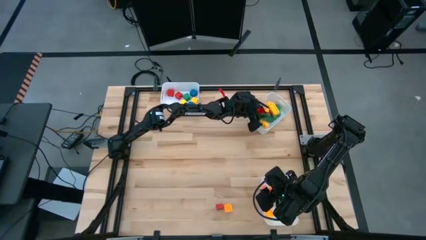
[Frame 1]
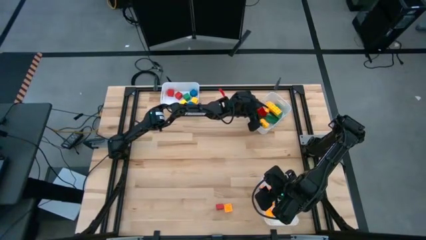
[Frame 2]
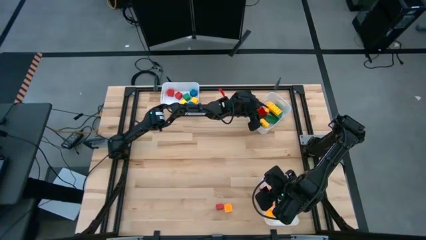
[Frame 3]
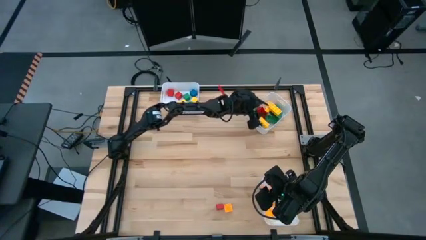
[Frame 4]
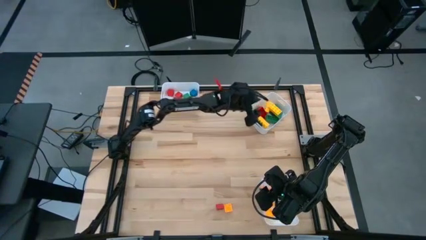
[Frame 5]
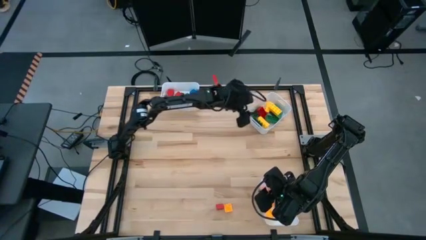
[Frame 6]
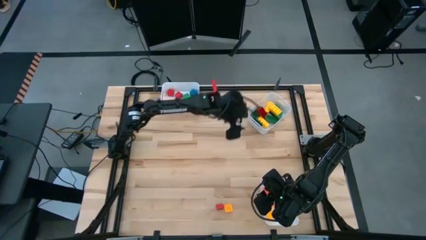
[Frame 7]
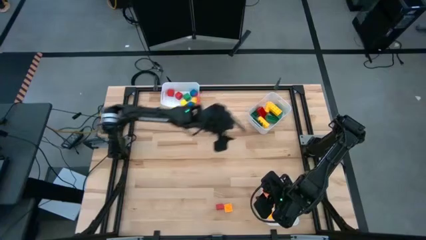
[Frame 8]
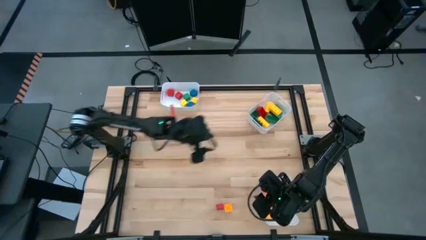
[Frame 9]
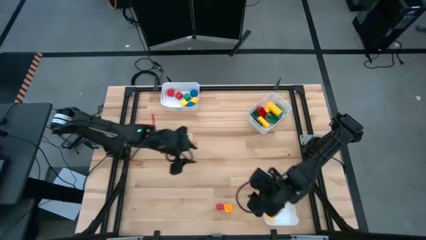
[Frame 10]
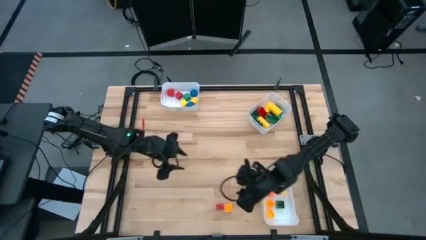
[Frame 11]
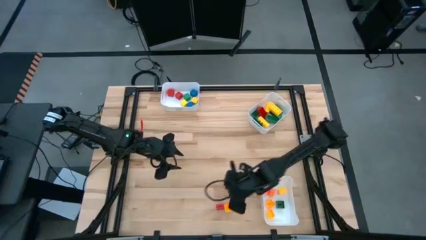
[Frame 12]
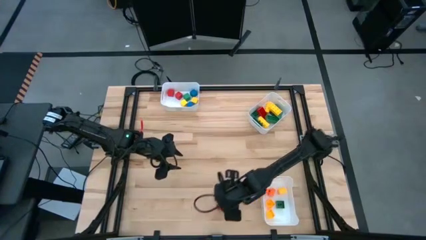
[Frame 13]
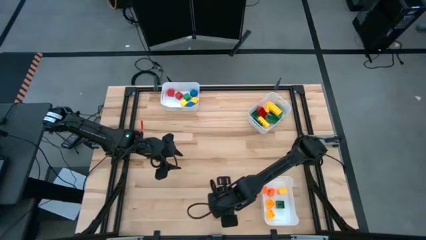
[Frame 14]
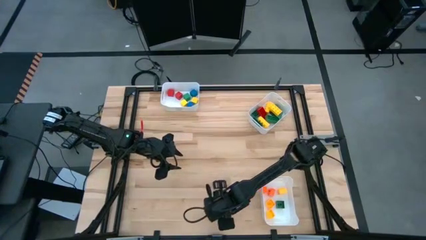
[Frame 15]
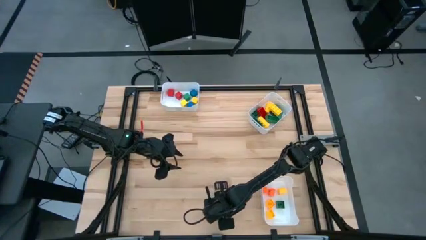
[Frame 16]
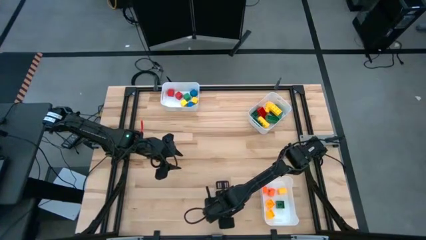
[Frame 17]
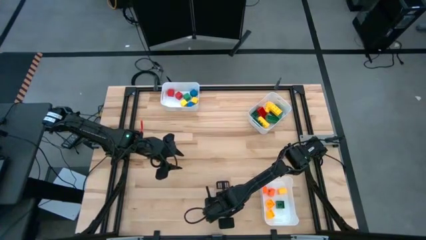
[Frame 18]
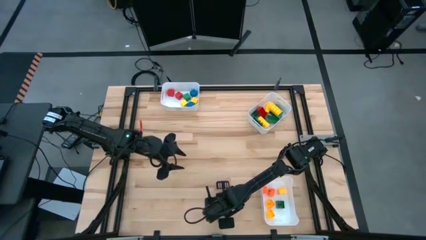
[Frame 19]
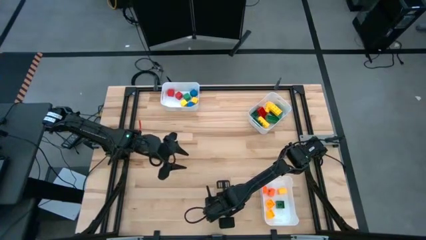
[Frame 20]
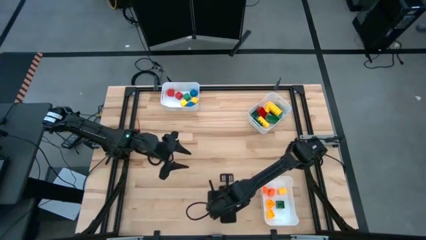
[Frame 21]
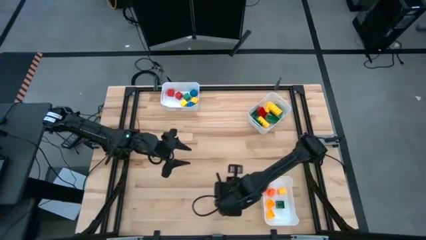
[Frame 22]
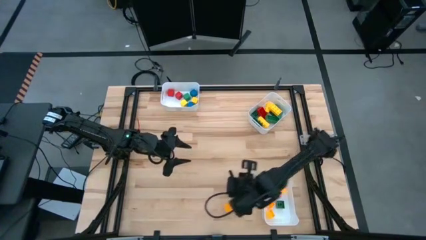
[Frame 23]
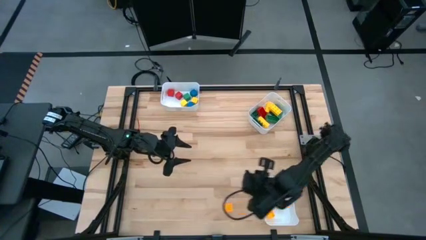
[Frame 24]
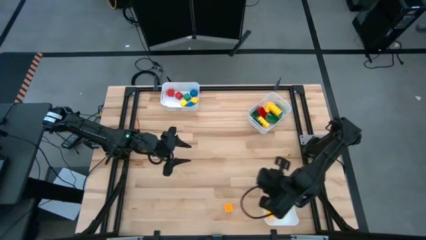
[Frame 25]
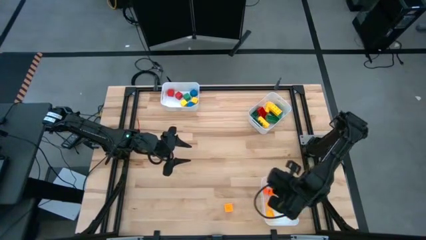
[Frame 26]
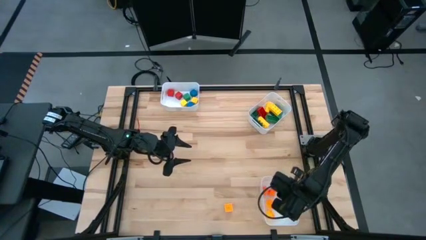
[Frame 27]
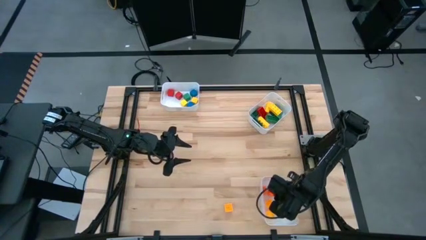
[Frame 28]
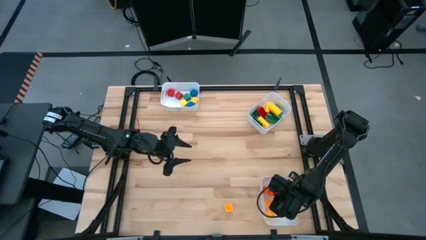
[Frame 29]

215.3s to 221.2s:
Task: Sort blocks by size
Put the red 4 stud gamepiece into the bottom white bin

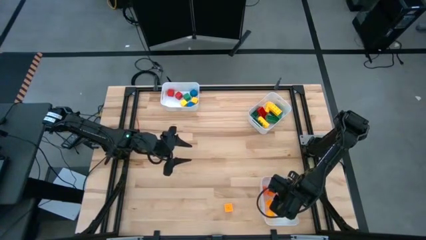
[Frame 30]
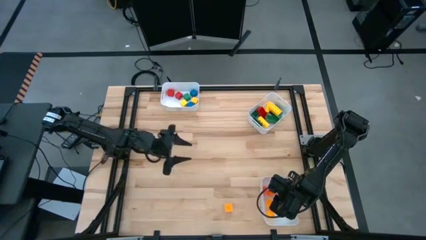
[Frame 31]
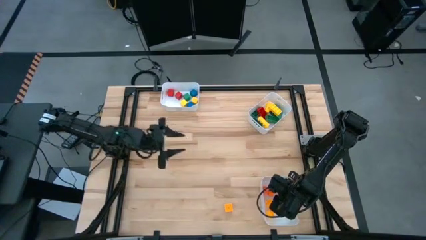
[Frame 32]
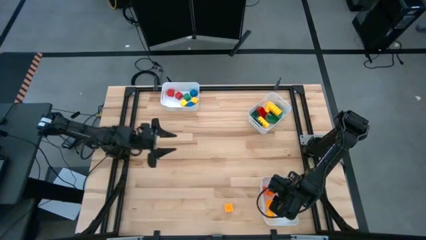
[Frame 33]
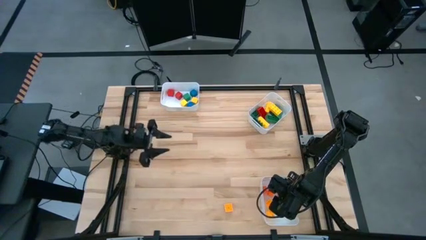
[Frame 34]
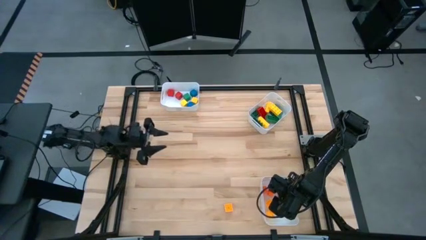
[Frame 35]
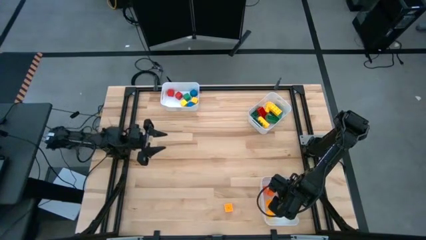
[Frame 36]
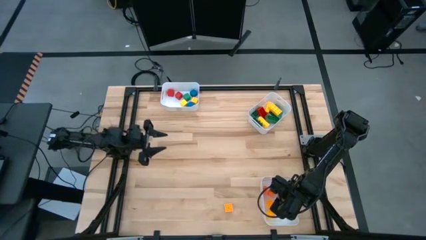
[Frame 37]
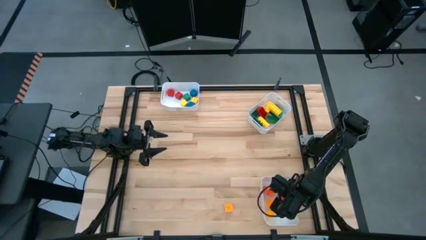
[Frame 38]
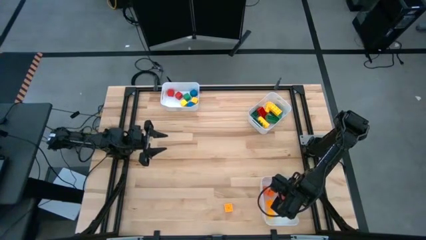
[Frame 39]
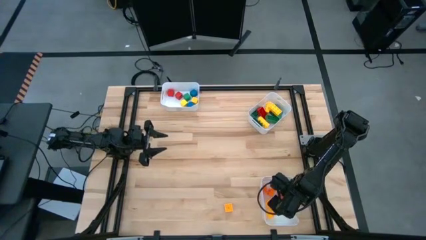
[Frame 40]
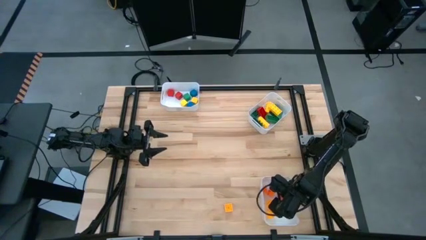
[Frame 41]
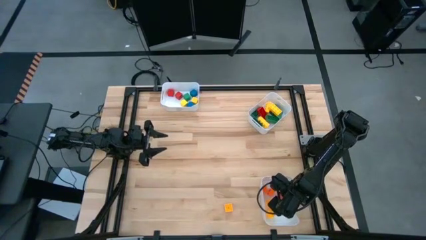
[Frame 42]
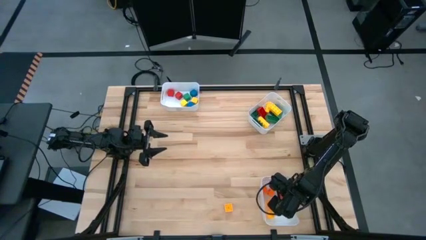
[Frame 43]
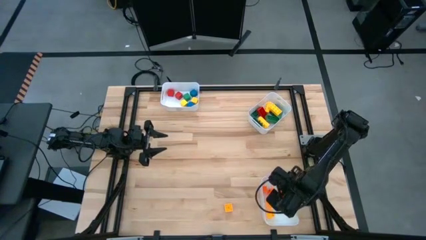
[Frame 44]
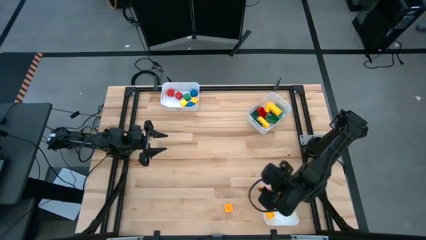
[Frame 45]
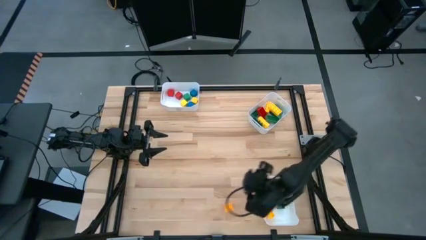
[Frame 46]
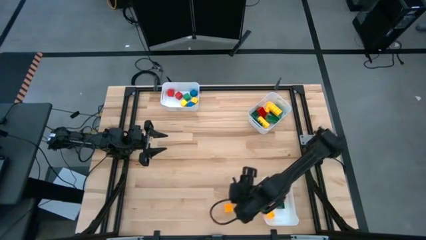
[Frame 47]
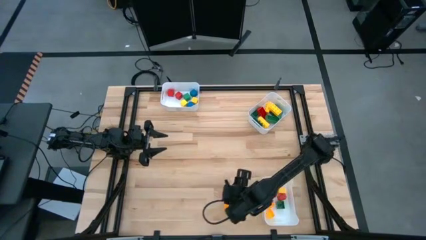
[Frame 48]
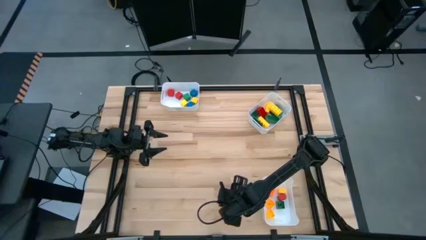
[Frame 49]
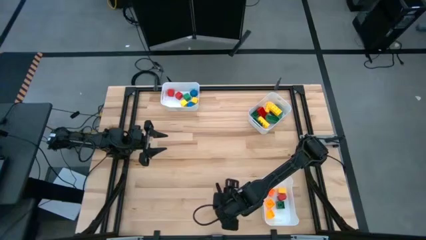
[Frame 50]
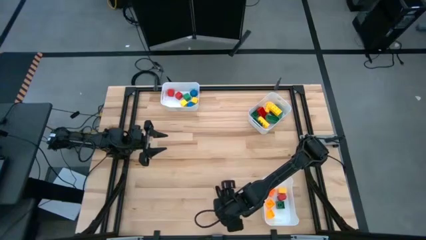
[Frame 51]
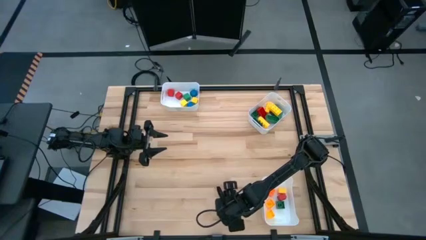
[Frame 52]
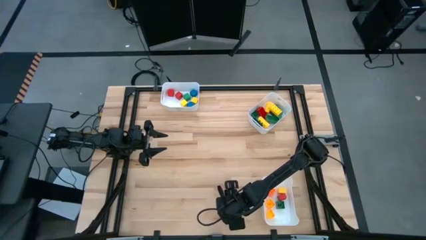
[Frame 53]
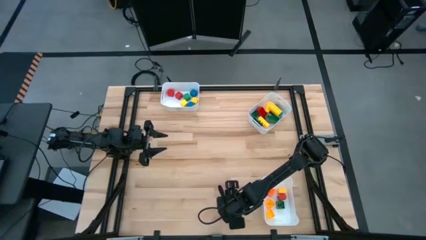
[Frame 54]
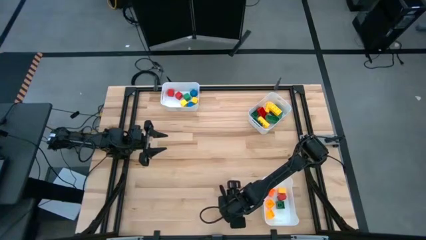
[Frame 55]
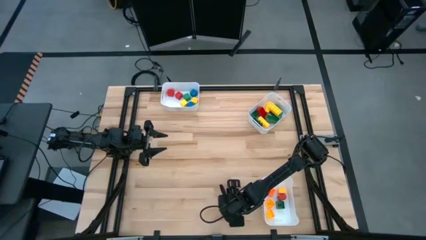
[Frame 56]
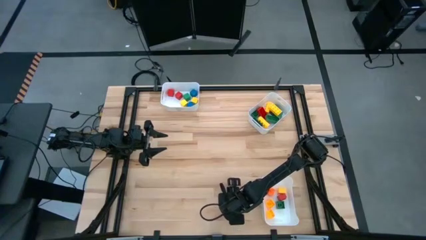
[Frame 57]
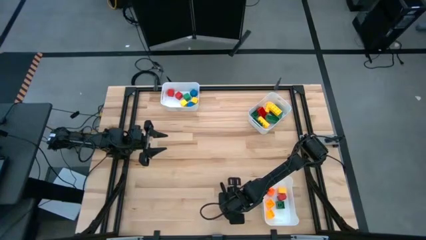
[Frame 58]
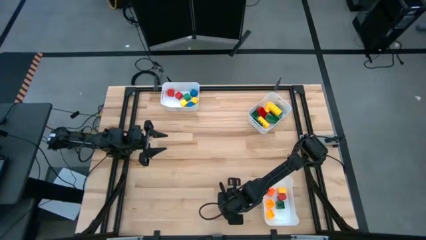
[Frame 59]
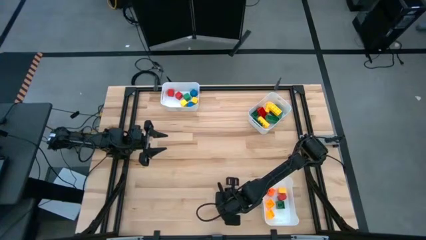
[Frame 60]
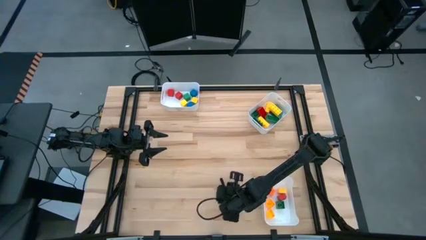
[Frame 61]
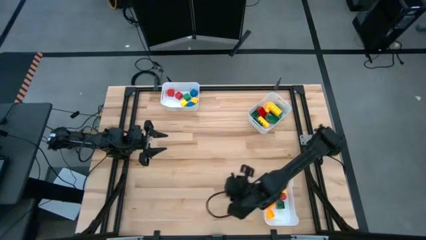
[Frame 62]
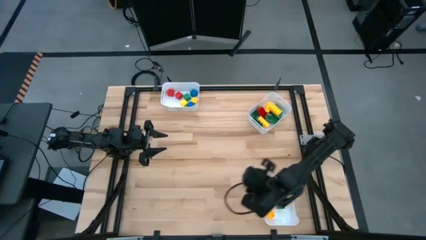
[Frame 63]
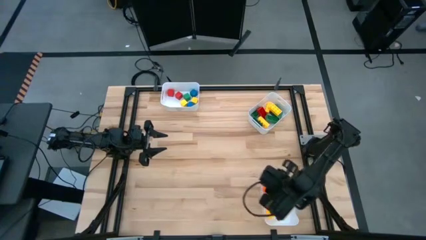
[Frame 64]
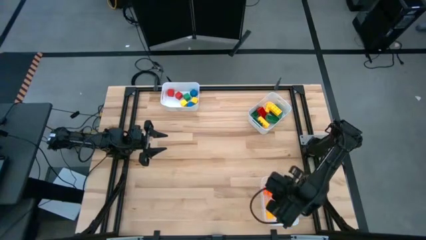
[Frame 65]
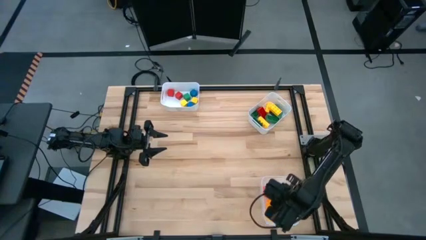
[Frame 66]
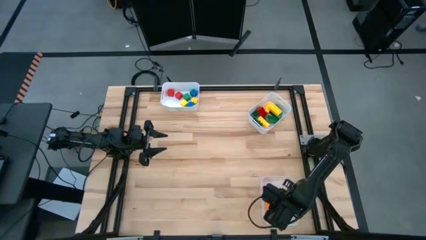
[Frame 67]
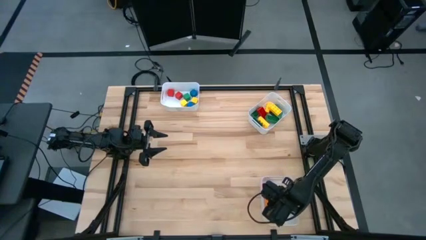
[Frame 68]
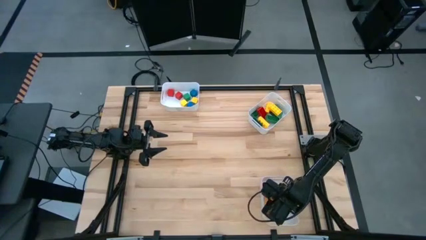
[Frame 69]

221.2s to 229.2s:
Put the yellow 4 stud gamepiece into the bottom white bin

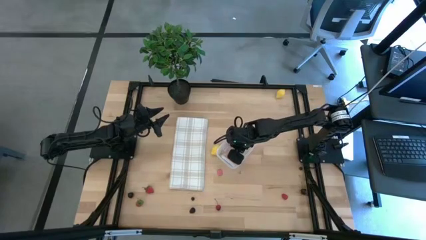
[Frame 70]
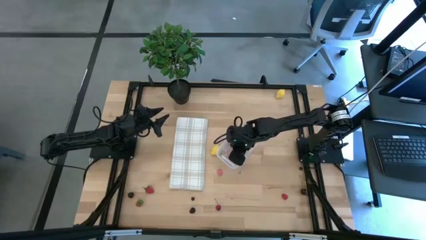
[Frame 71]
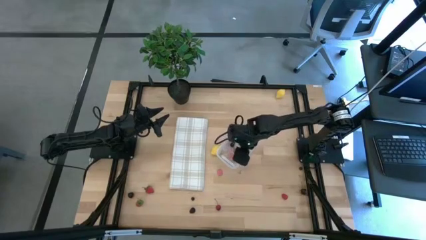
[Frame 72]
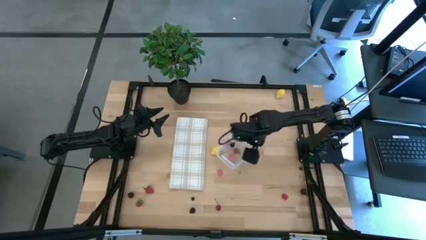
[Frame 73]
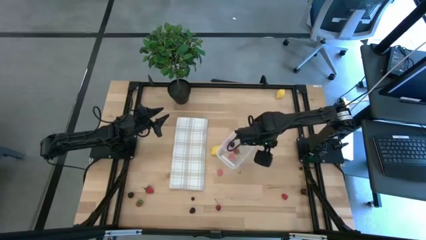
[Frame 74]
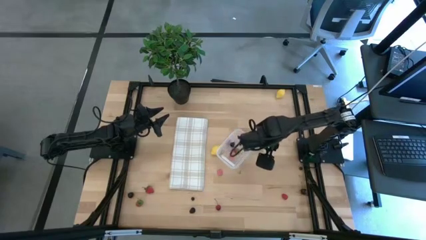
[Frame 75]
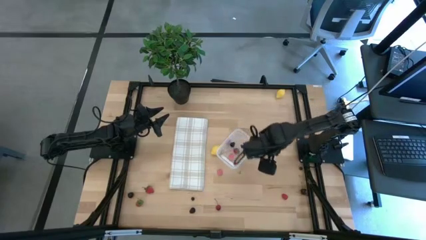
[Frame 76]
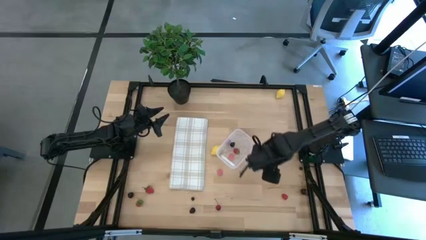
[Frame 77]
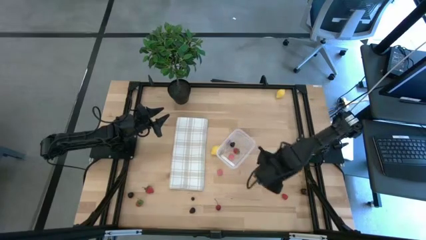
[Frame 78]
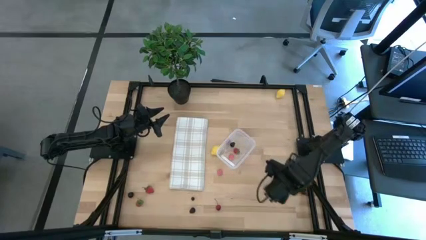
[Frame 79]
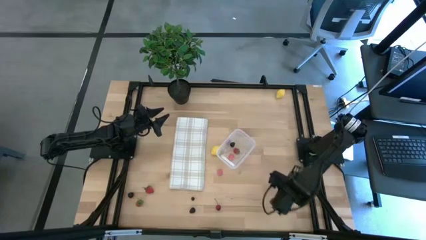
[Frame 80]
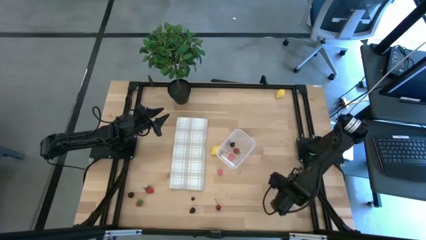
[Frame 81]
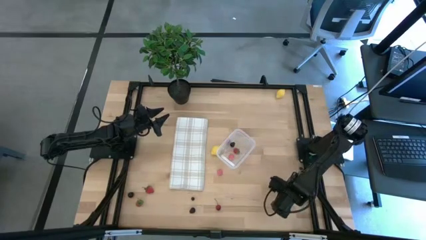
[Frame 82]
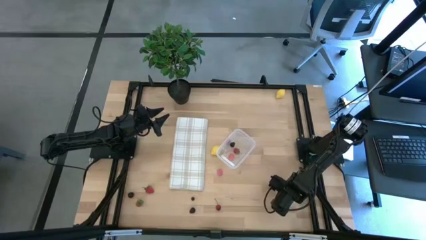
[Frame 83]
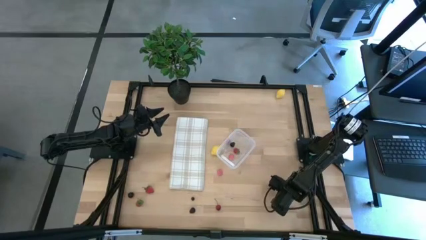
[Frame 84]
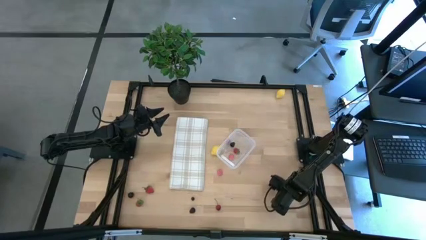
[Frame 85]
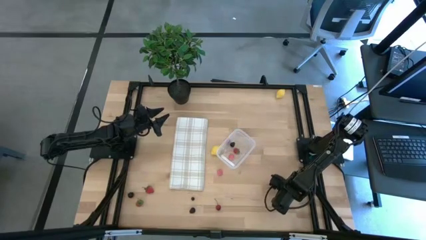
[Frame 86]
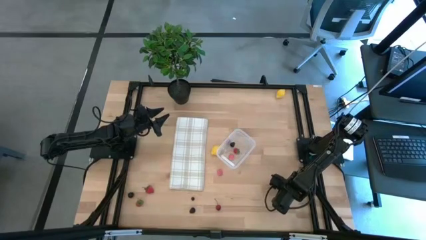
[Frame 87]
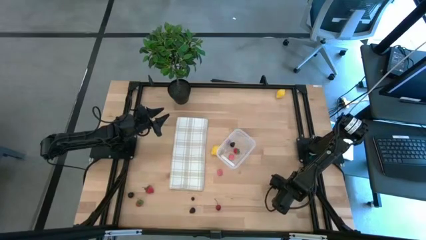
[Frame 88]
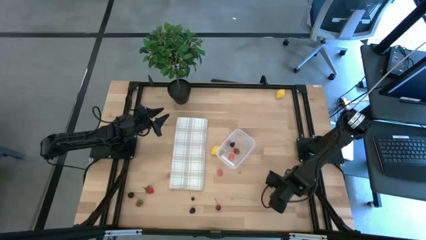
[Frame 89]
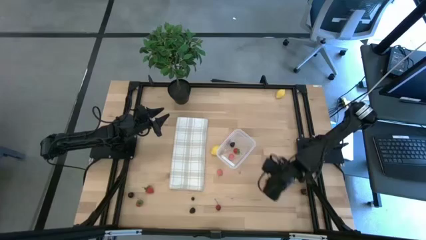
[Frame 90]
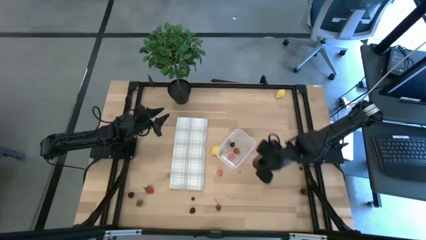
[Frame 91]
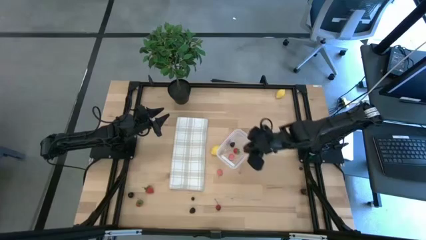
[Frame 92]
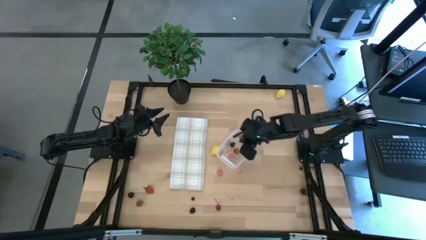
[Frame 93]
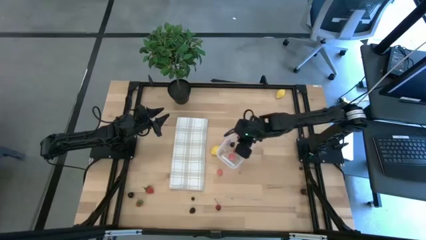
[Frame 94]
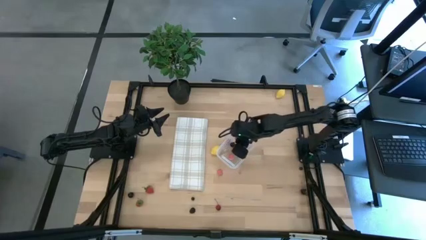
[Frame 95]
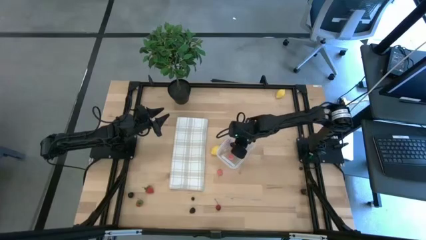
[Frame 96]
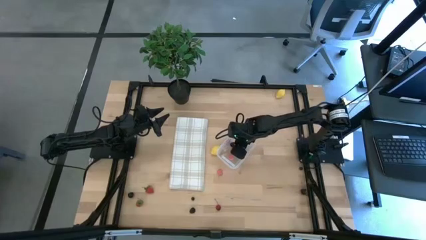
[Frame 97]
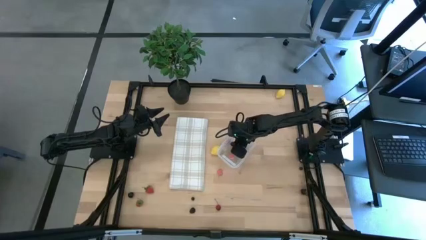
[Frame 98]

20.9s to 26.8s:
Task: Pick and placing Produce into tupperware
Put the raspberry into the transparent bin
